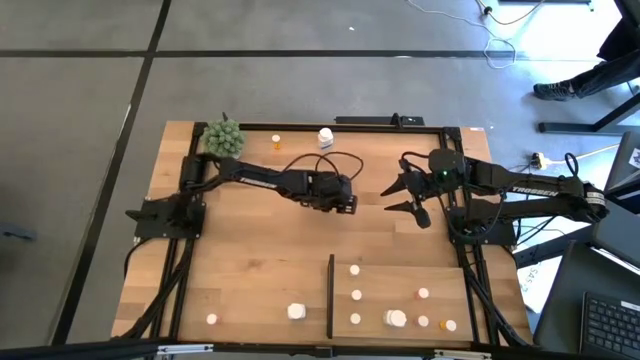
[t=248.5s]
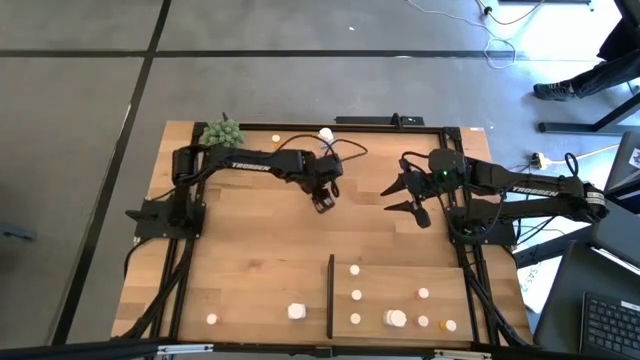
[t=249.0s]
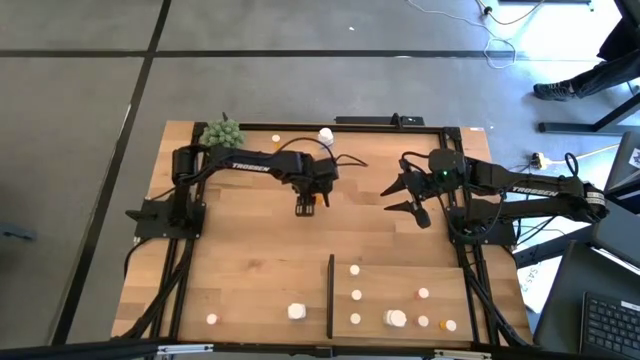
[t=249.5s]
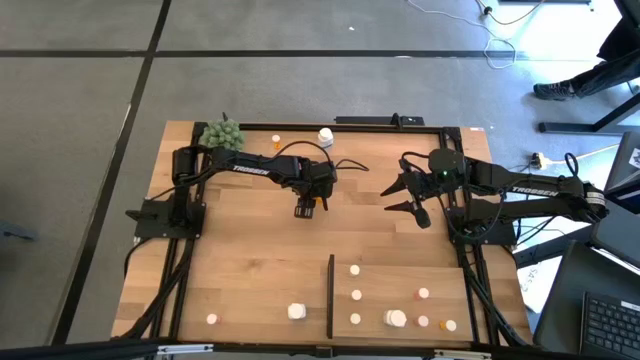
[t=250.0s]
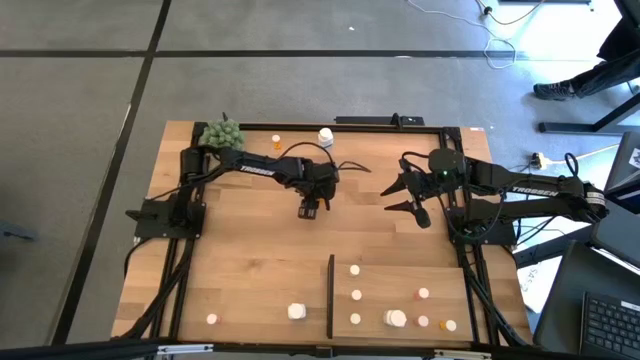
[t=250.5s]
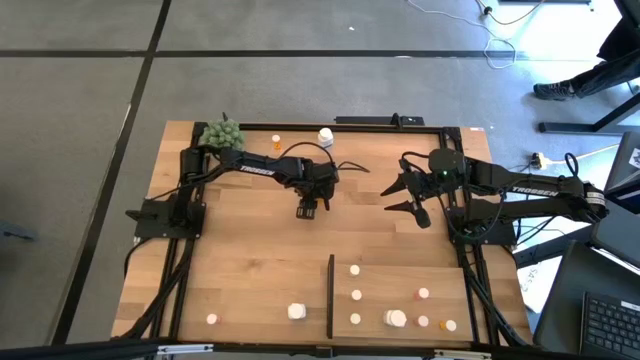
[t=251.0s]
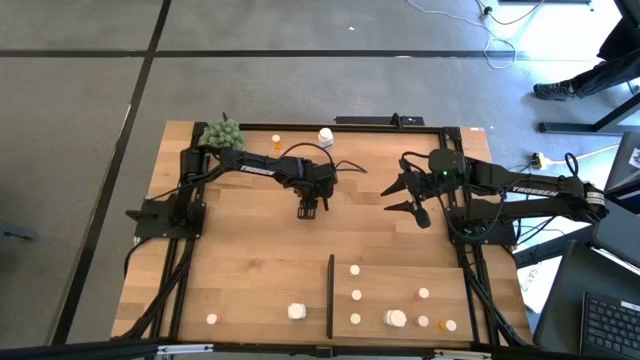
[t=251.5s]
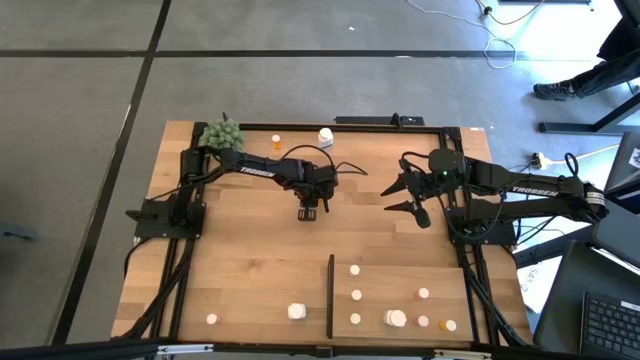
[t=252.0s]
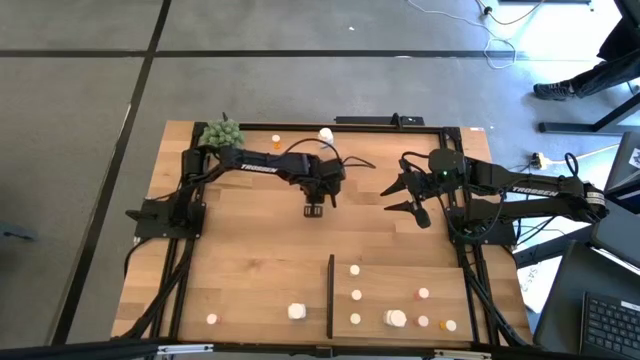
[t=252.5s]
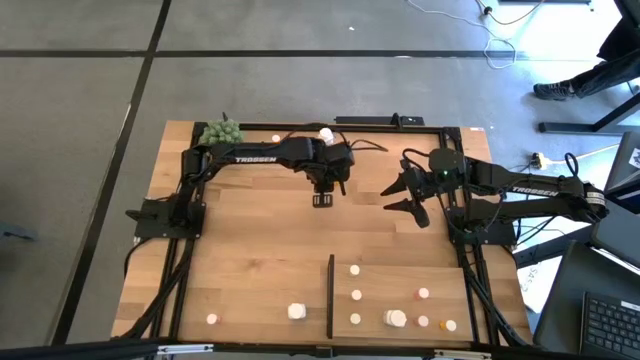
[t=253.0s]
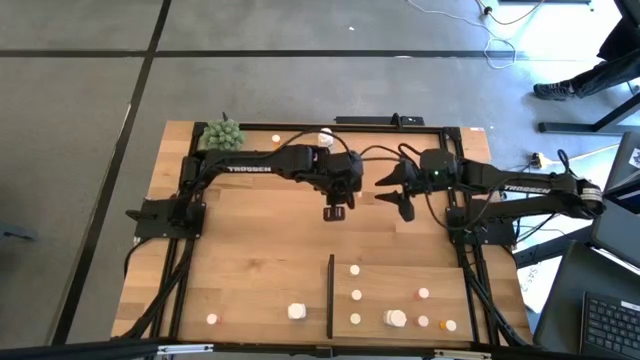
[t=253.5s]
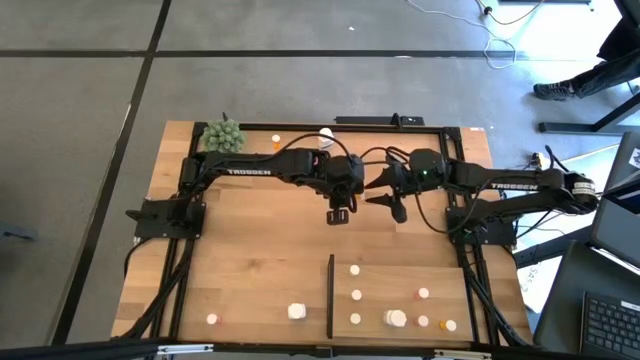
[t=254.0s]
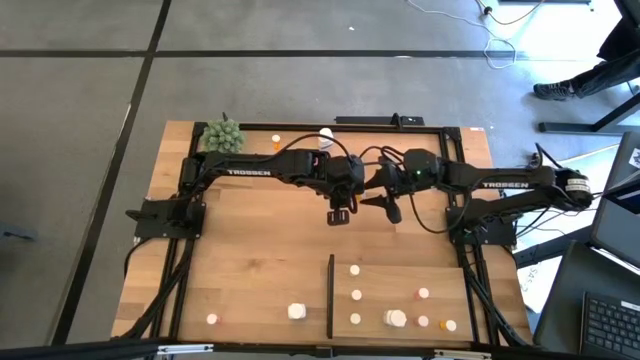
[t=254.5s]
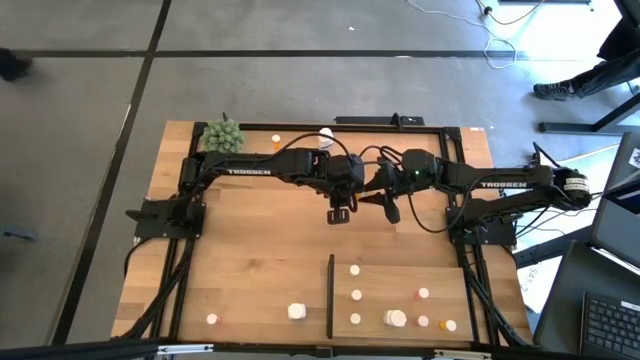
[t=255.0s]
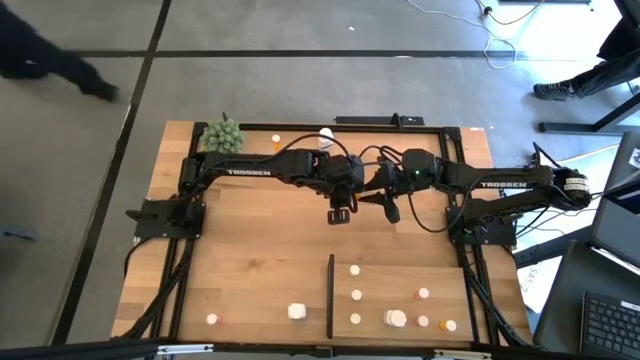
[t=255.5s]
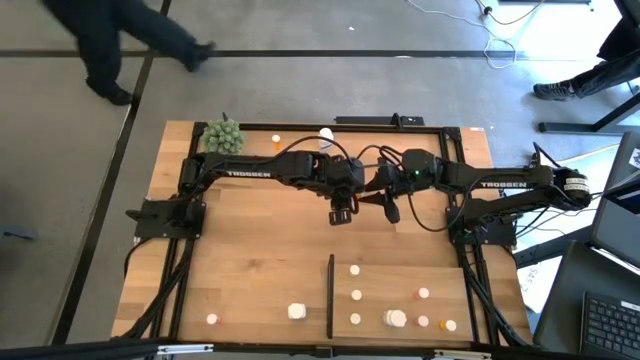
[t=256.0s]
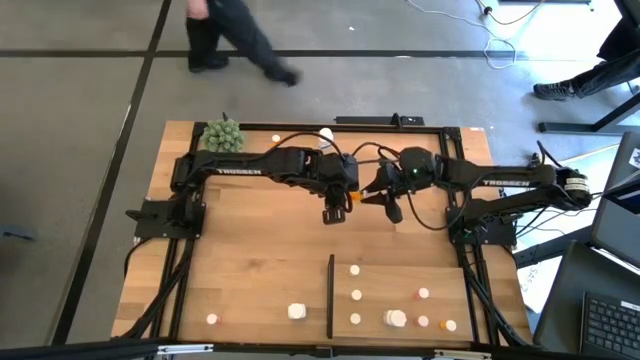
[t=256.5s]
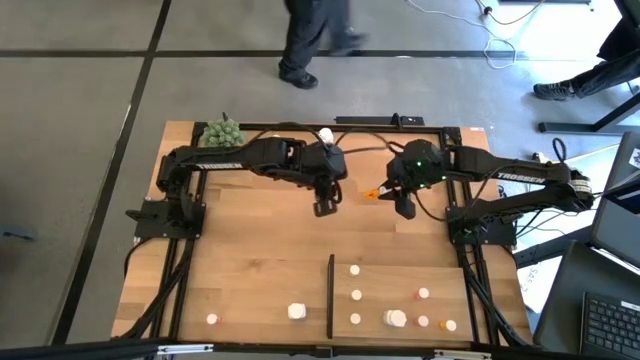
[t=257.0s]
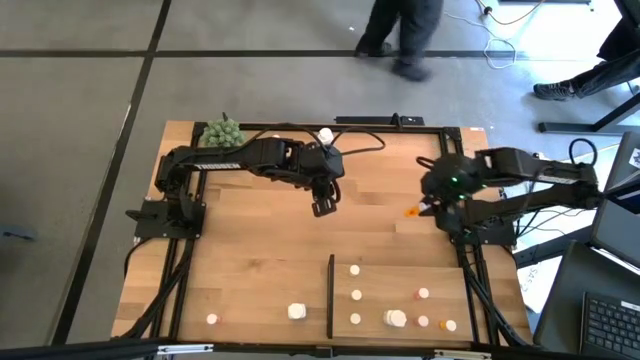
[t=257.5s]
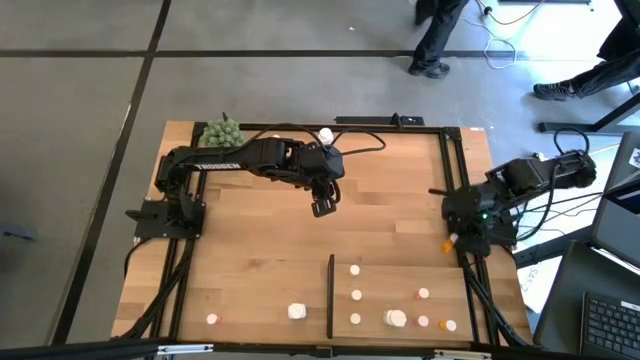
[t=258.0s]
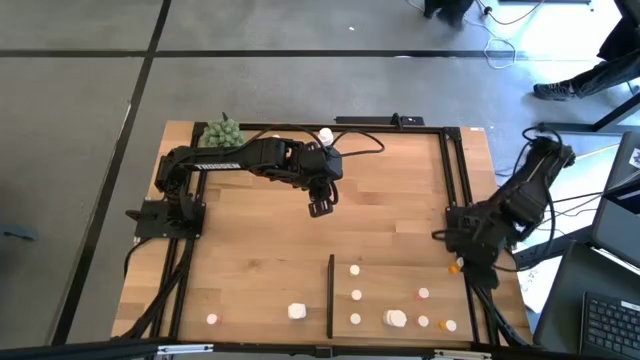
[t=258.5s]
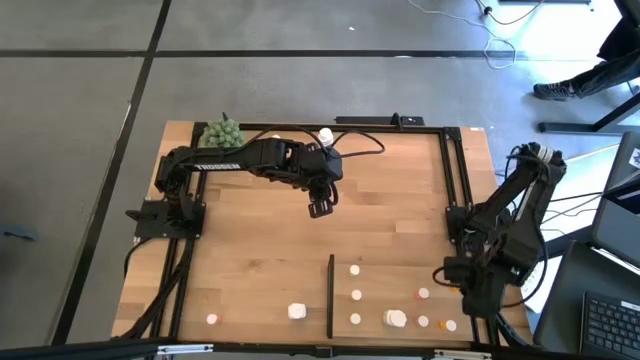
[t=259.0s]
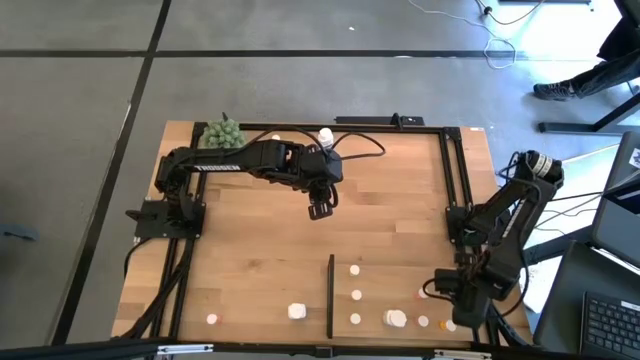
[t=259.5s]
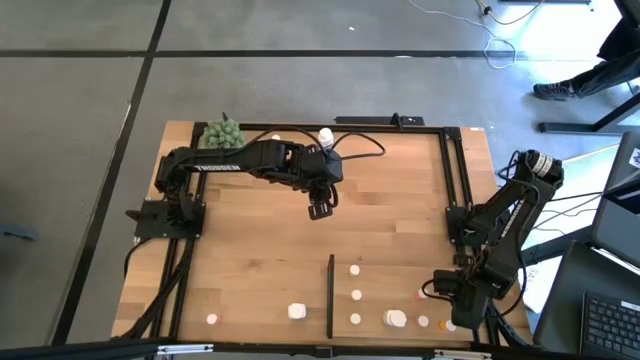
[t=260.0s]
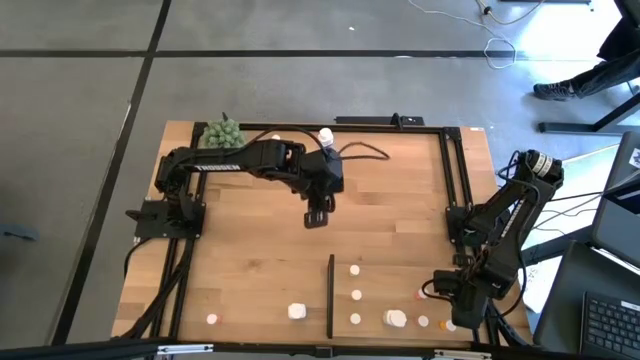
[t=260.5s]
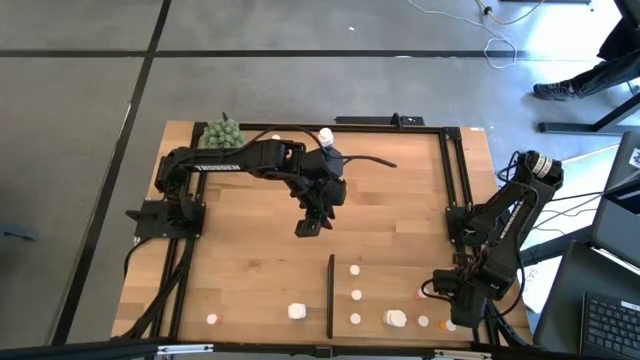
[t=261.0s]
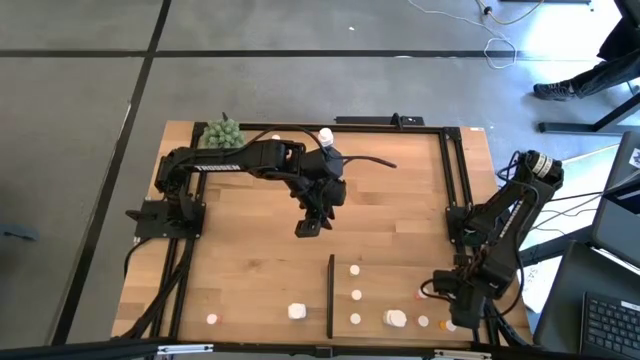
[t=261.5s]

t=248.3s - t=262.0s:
Task: Pick and place medicine bottles onto shelf by color
Put the bottom orange pill bottle on the shelf aligned with the other orange pill bottle

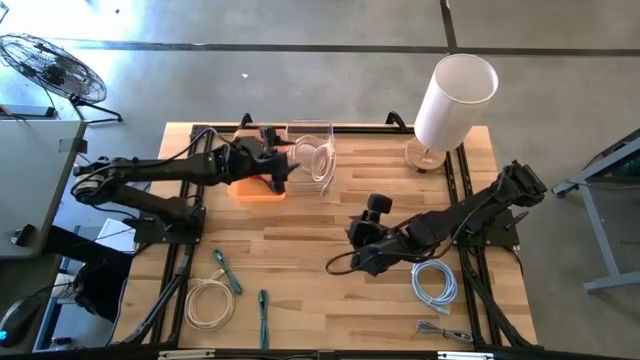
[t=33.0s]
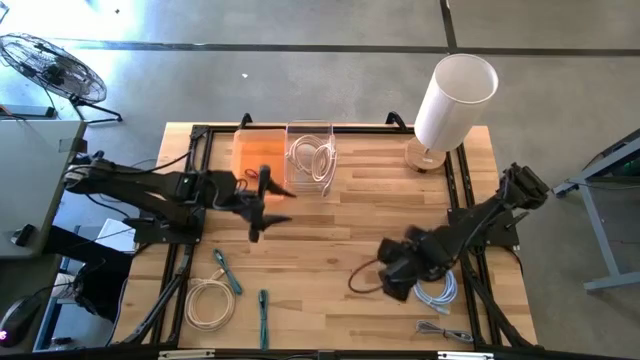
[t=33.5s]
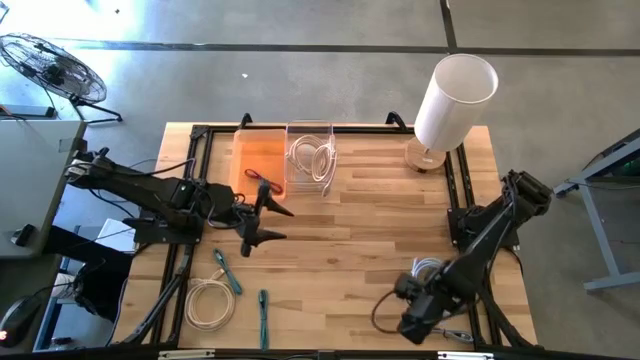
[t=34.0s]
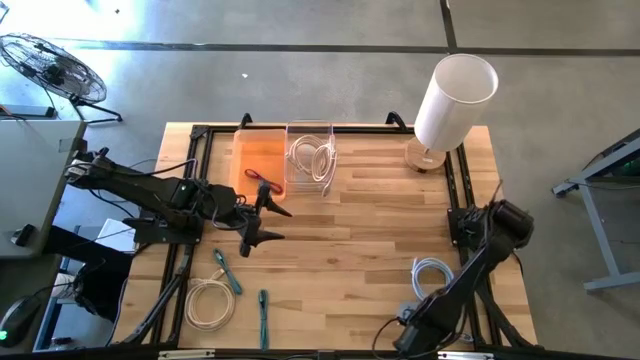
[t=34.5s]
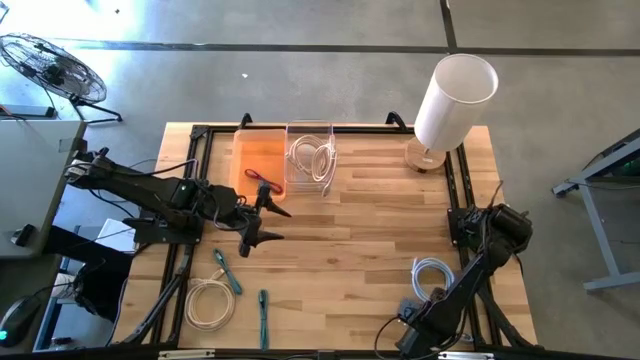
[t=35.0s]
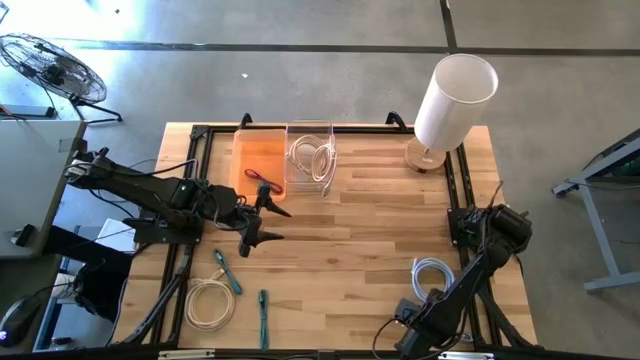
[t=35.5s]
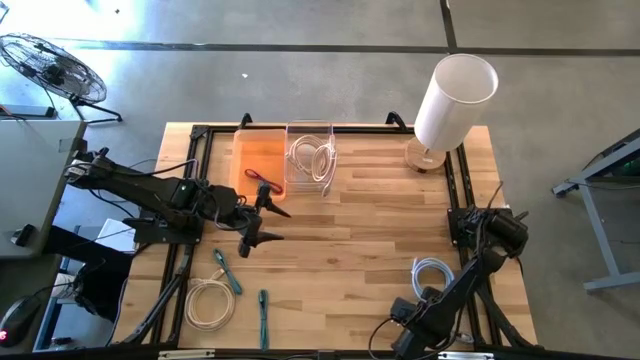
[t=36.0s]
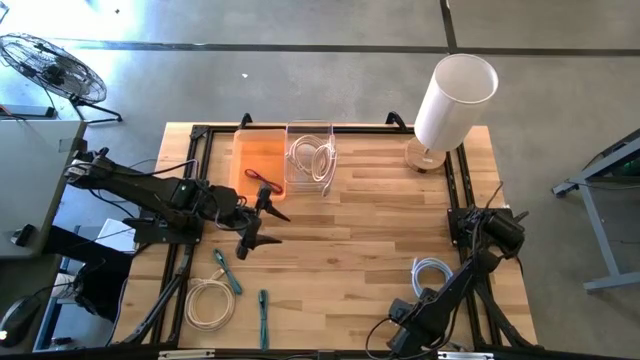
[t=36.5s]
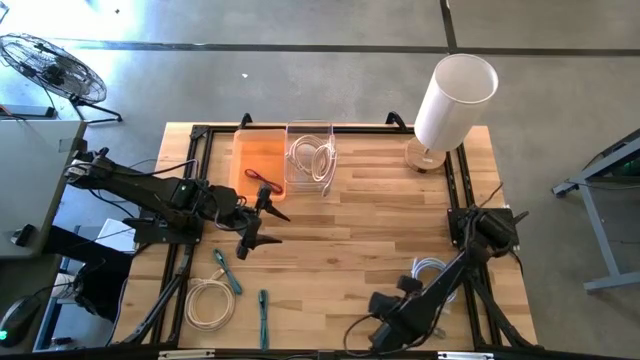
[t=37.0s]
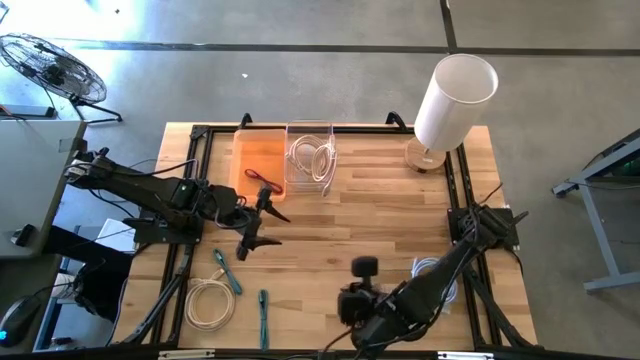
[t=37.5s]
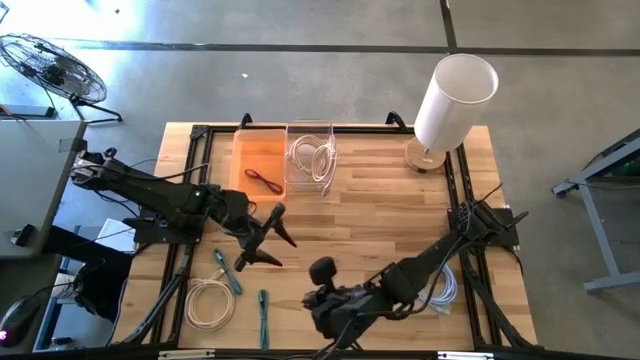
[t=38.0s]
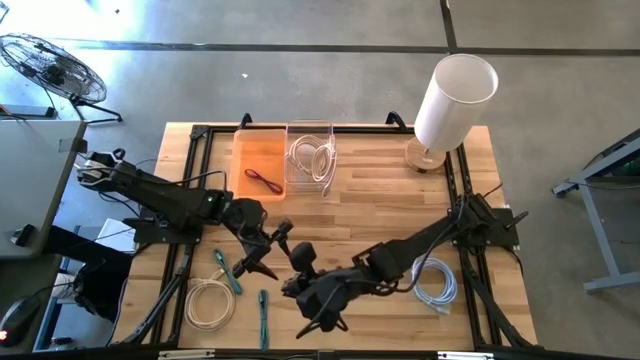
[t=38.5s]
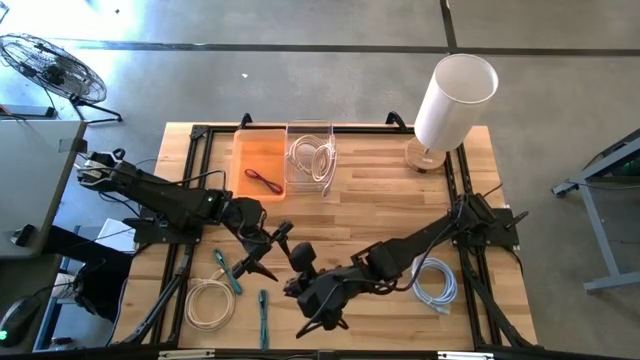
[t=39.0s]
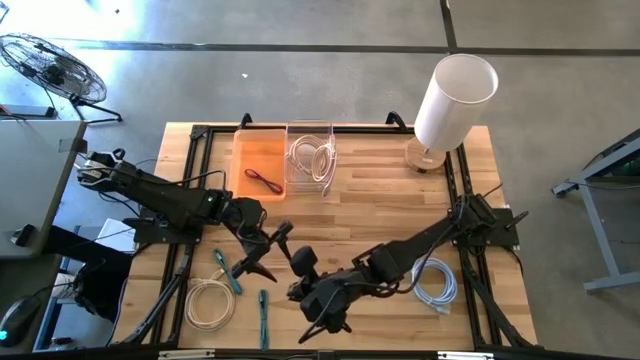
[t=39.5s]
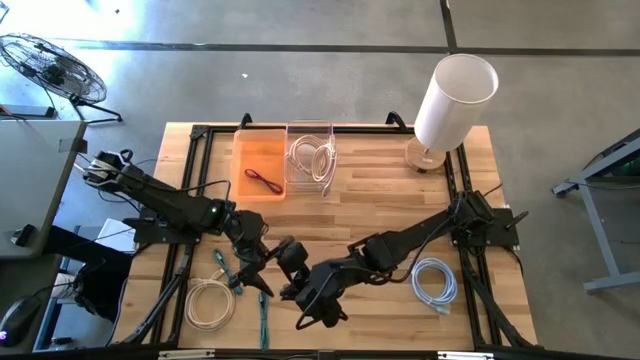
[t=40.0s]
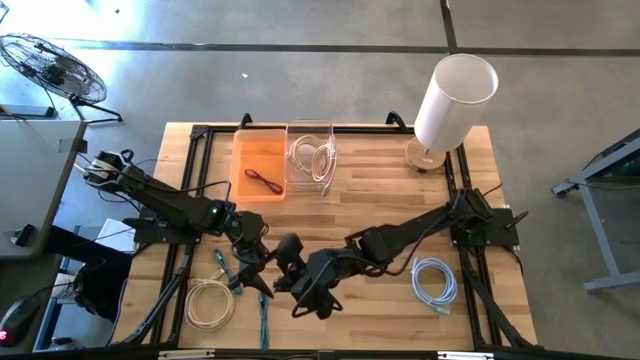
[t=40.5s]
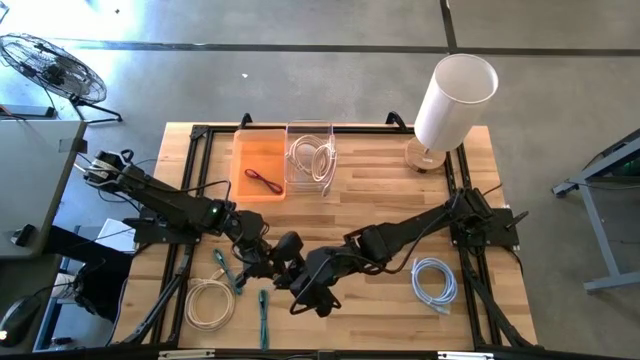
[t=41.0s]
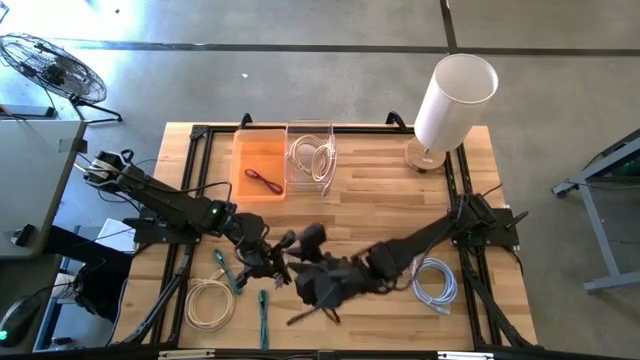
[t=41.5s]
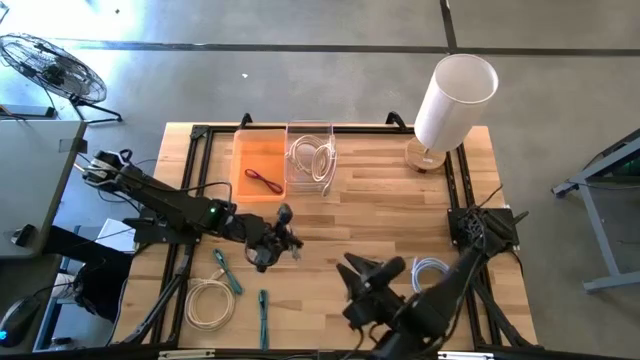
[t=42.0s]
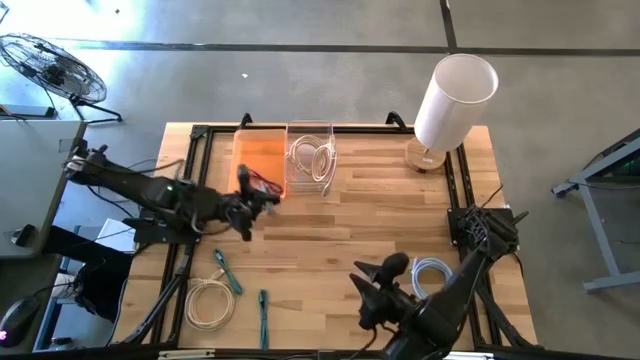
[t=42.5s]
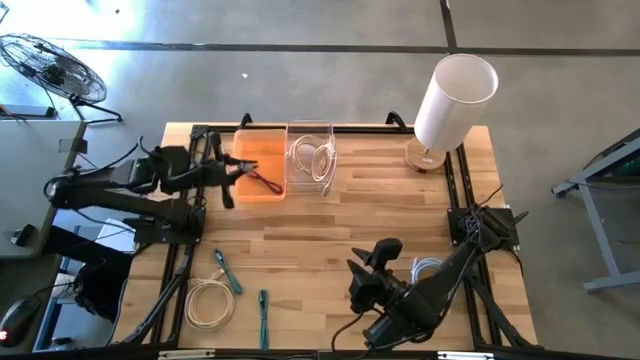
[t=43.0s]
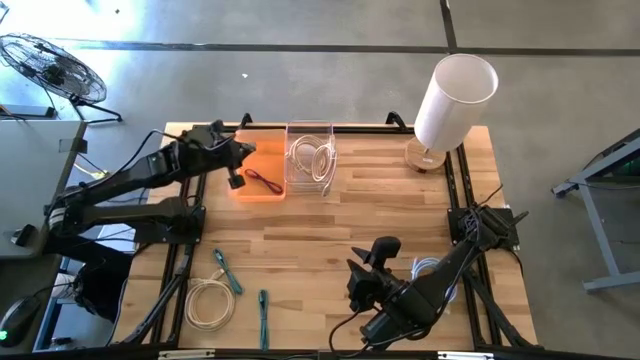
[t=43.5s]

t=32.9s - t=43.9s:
Task: Pick & Place USB Port
Put the white and black charger cable into the orange bin
